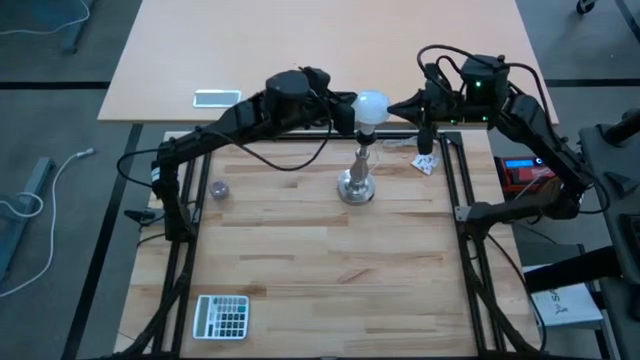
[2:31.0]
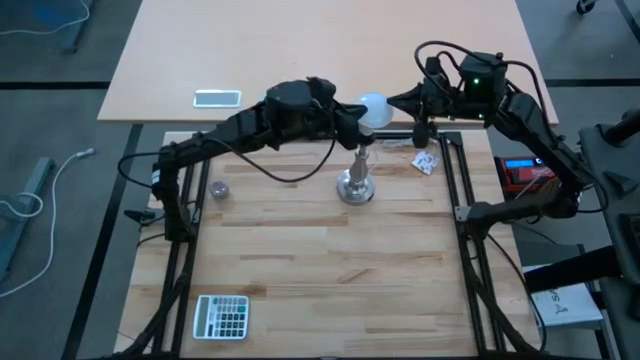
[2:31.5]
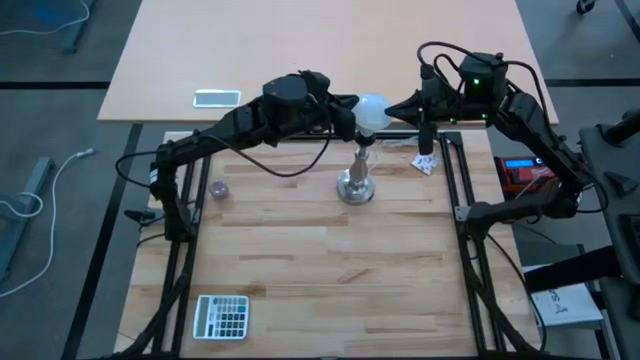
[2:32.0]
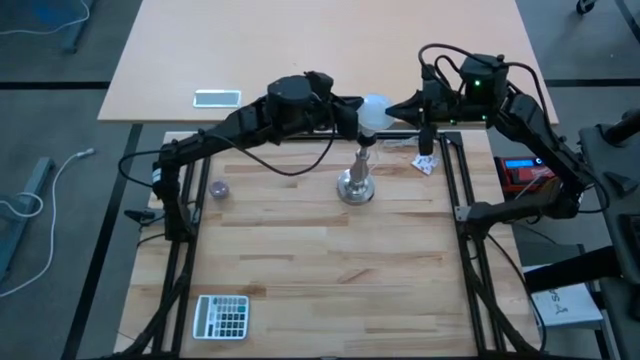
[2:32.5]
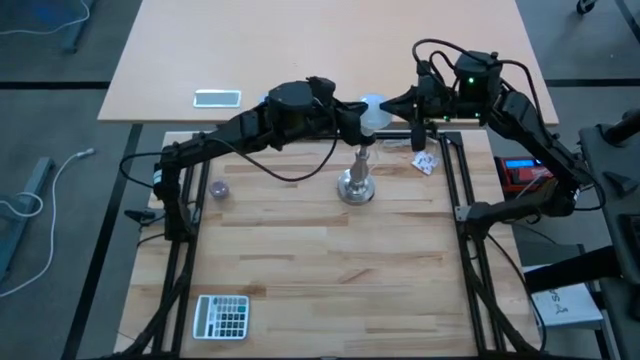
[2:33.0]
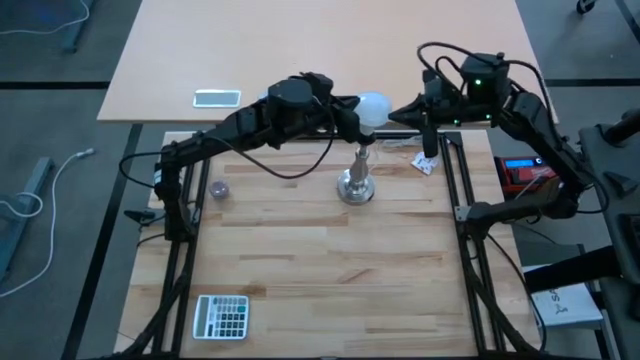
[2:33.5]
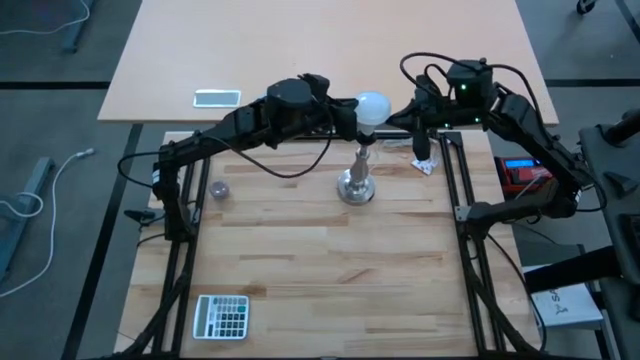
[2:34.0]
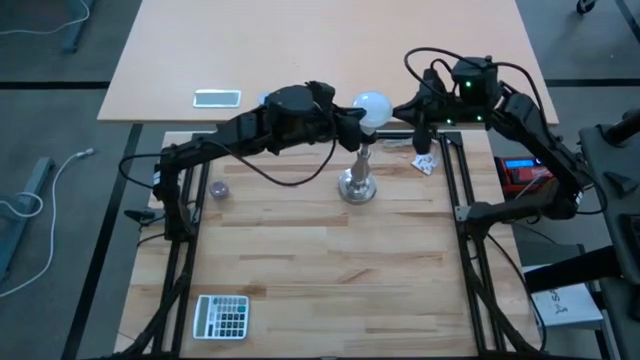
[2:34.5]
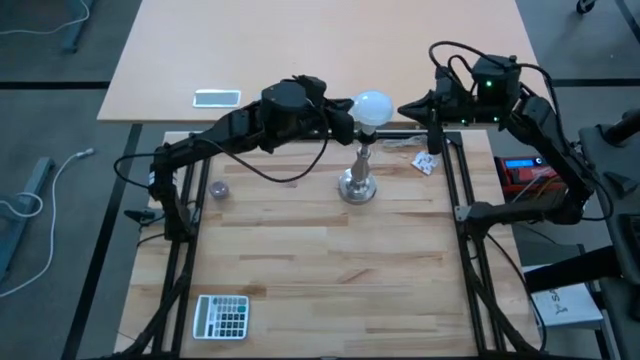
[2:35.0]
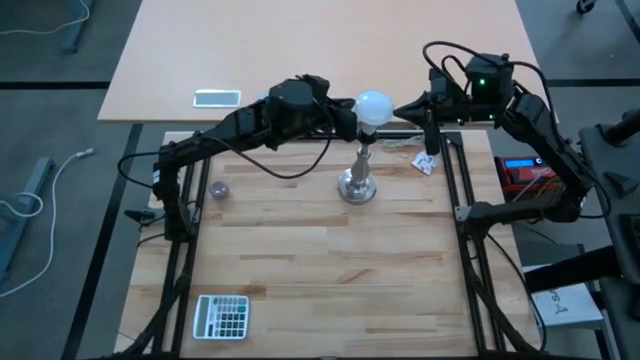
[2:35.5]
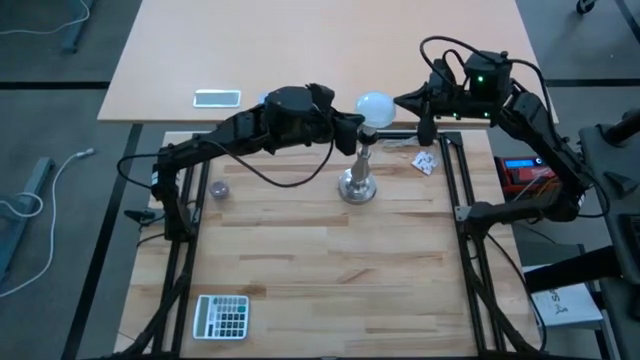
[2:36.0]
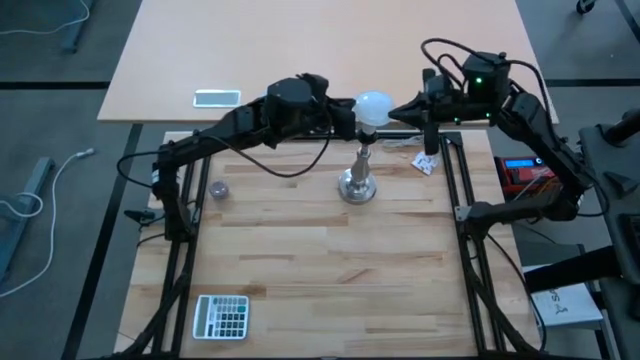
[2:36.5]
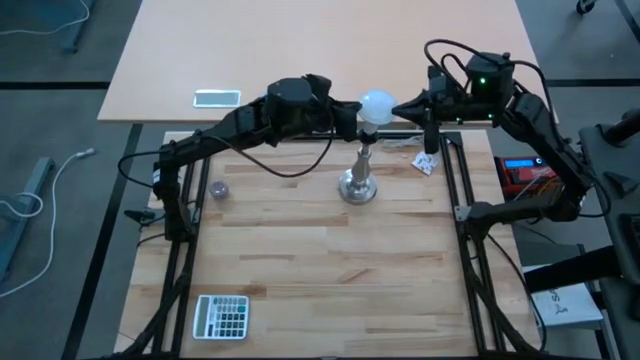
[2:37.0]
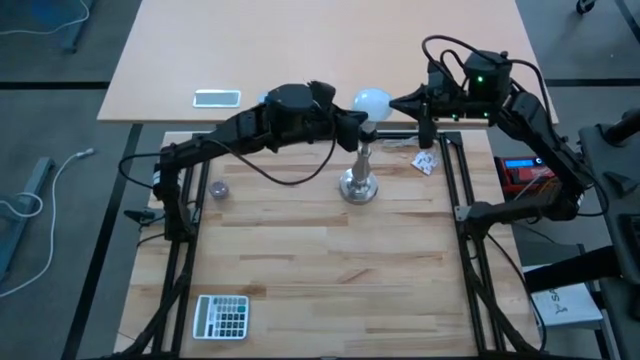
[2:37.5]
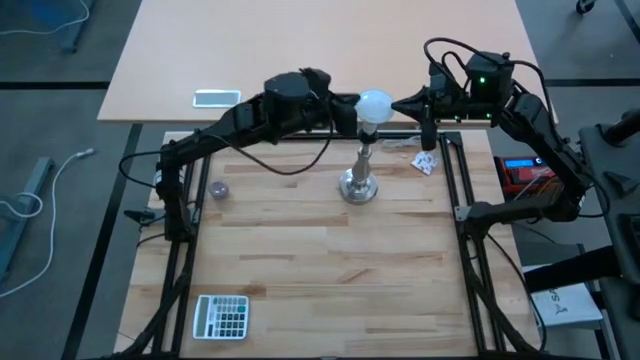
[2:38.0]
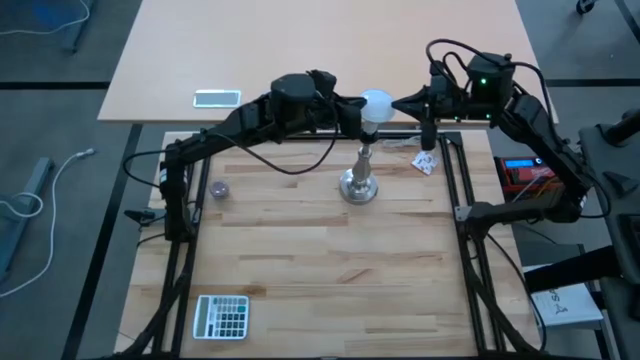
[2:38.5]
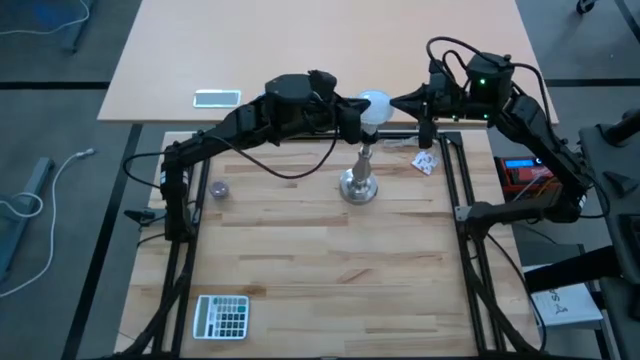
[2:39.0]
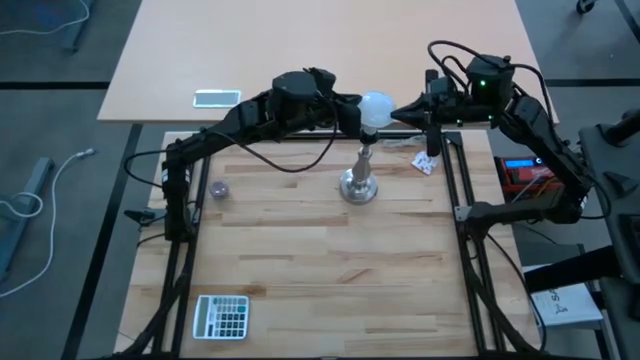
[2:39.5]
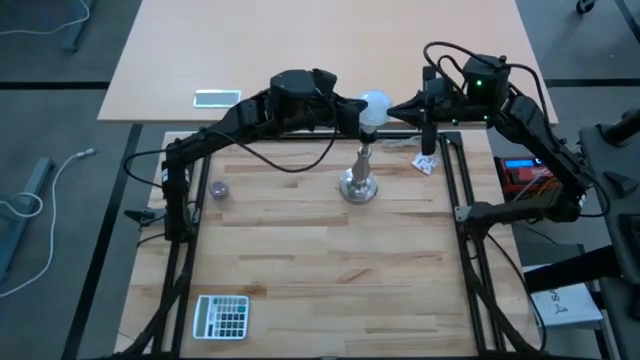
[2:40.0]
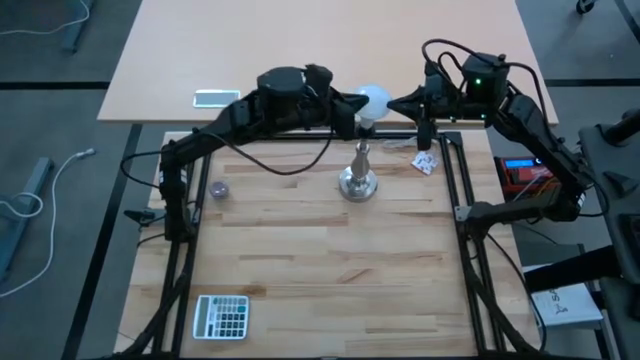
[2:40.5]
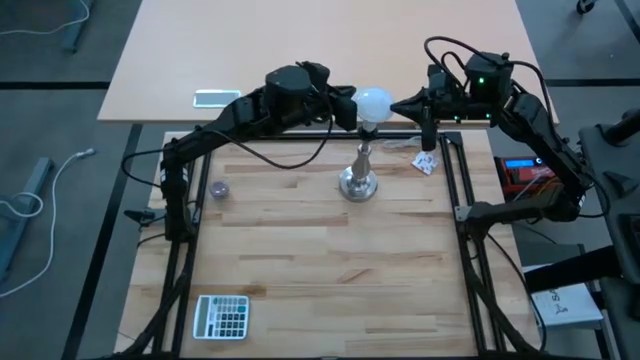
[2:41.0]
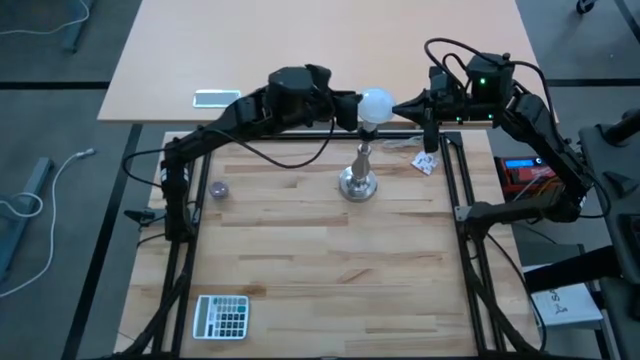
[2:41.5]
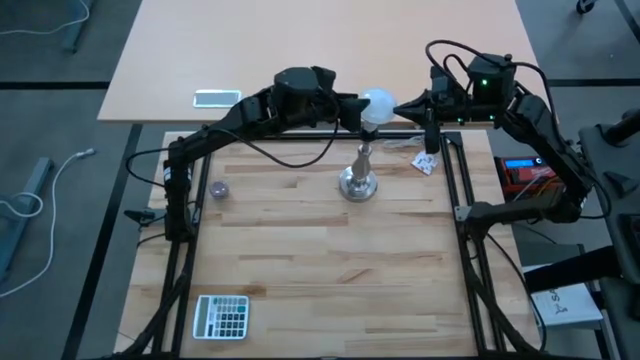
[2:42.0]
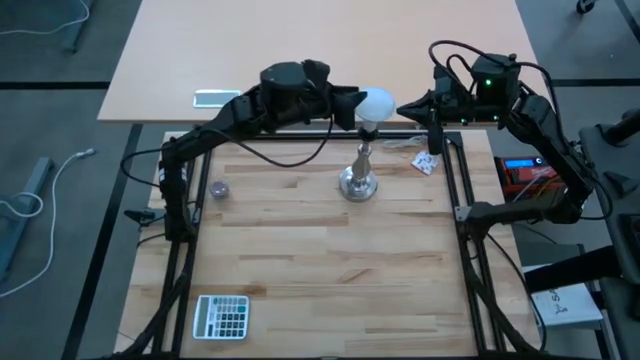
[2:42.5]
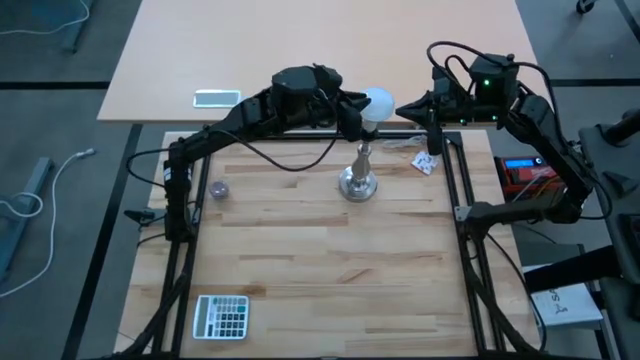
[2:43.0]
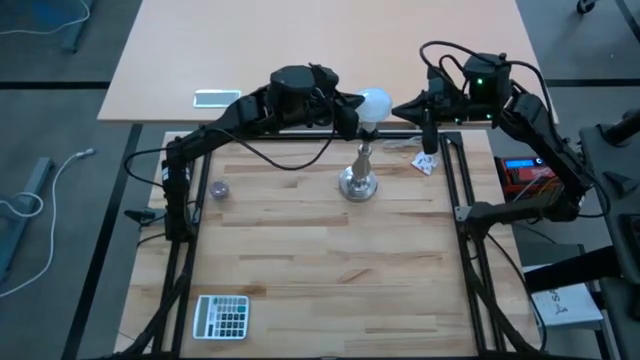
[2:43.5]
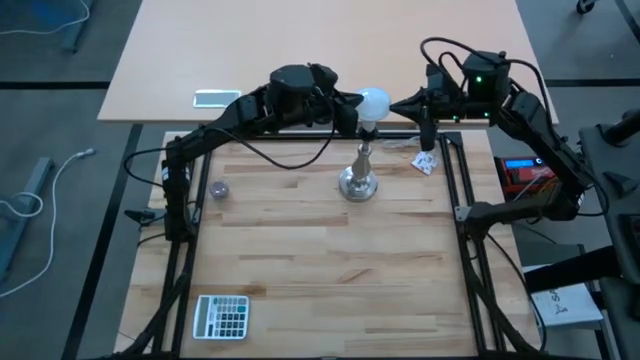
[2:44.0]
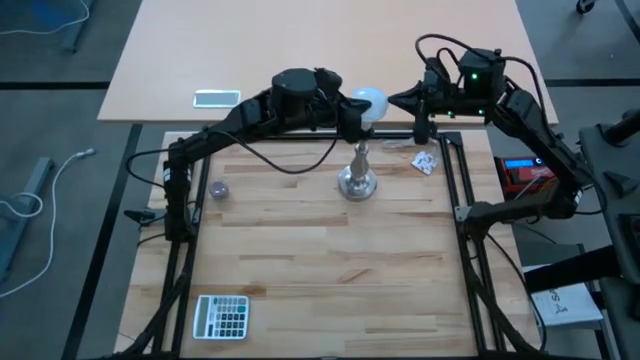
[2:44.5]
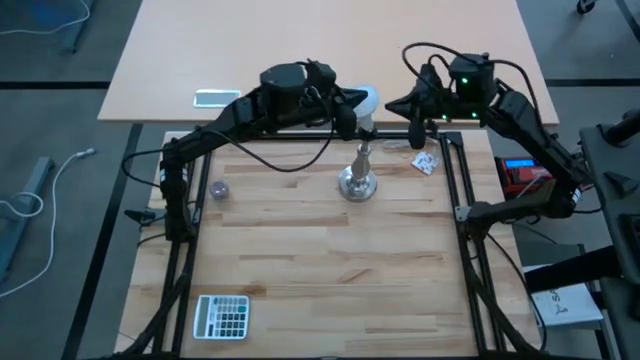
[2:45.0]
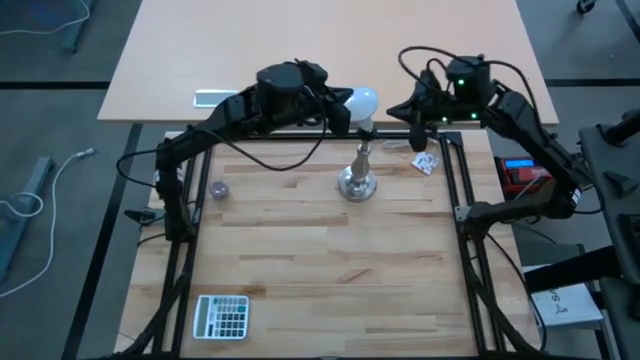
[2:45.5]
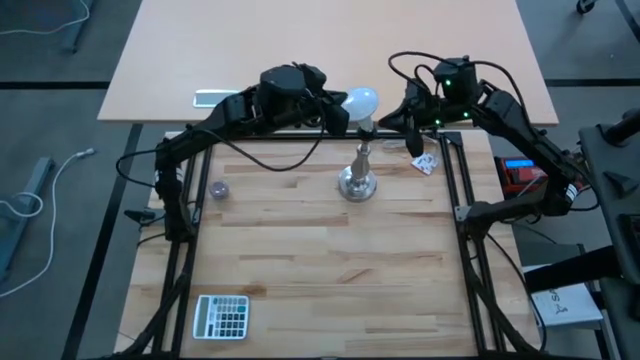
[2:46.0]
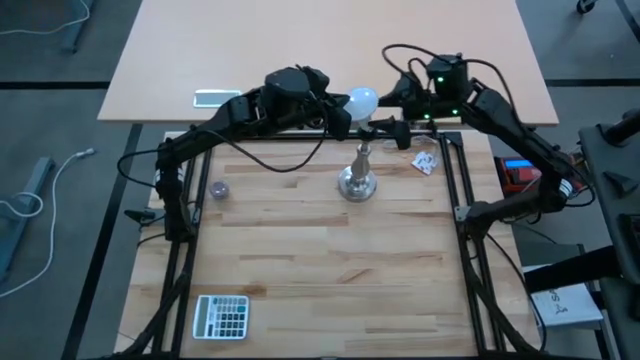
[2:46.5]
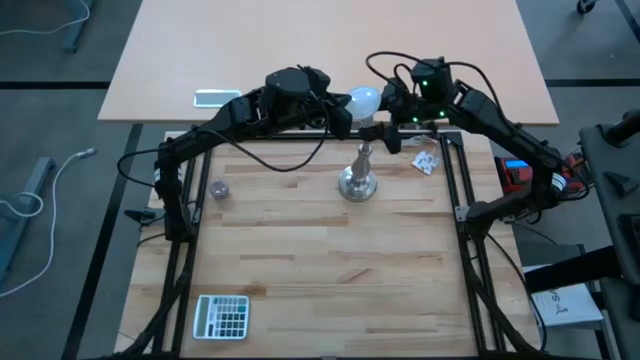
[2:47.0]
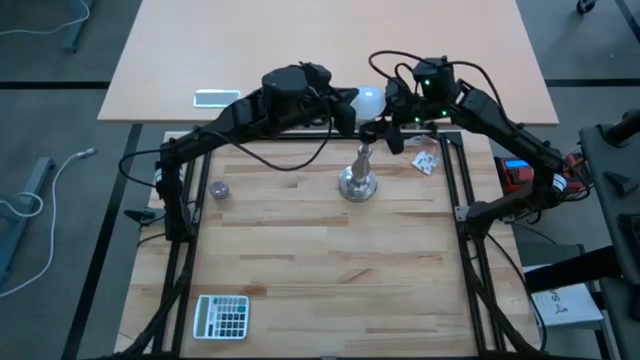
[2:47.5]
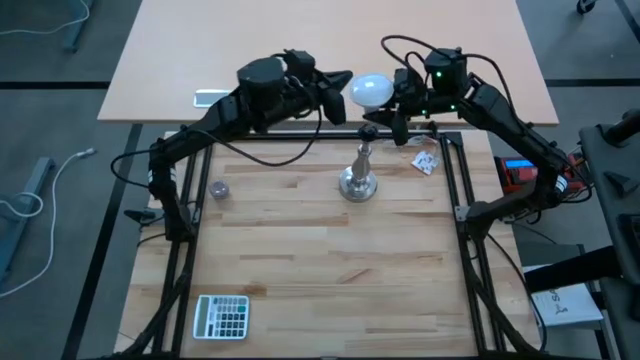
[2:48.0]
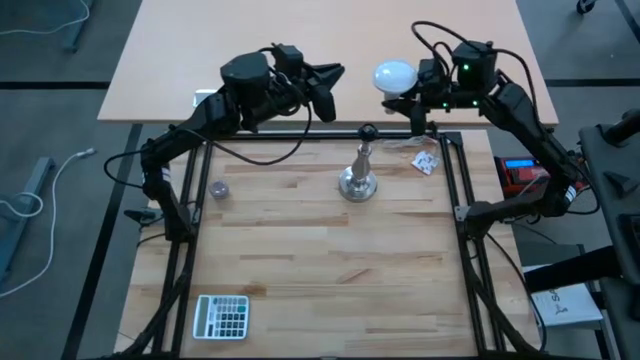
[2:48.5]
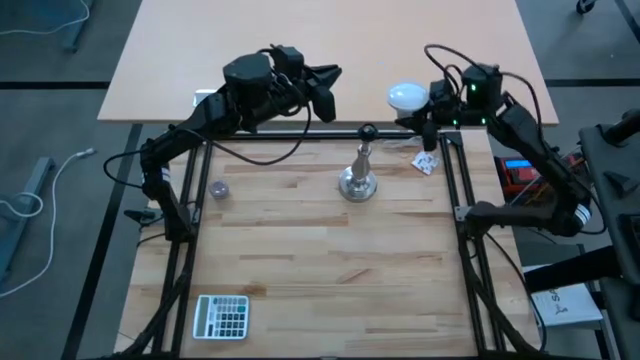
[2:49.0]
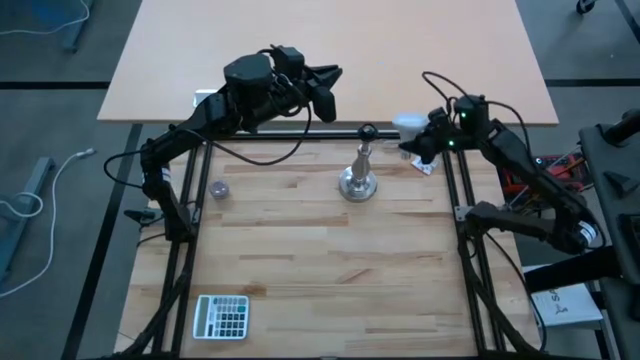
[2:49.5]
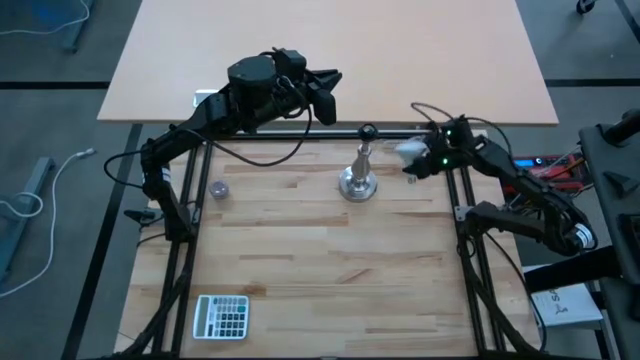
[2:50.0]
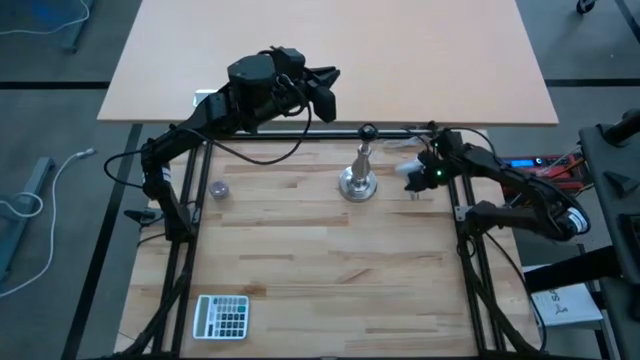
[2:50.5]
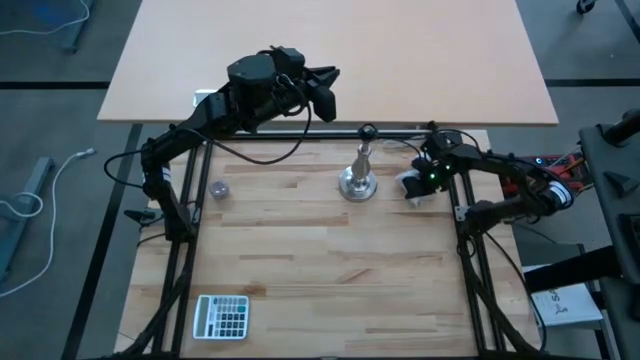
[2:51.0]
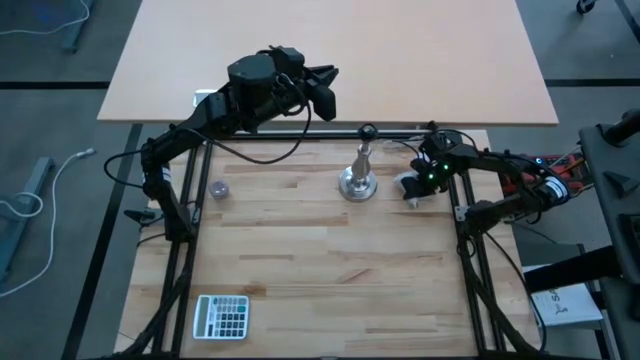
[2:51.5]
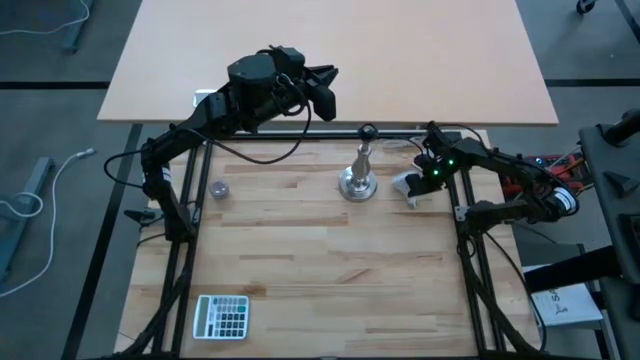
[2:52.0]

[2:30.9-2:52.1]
Task: Screw lightbulb
Remove the lightbulb from the lamp
